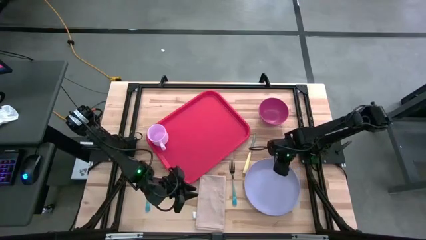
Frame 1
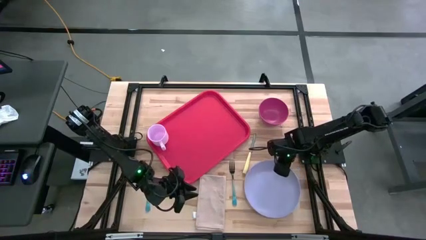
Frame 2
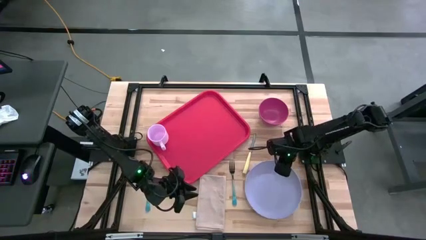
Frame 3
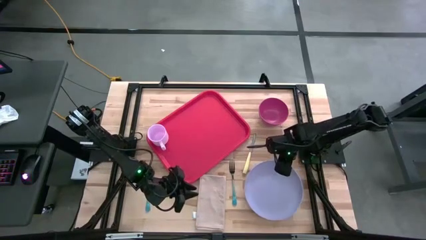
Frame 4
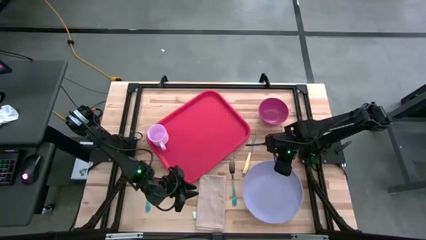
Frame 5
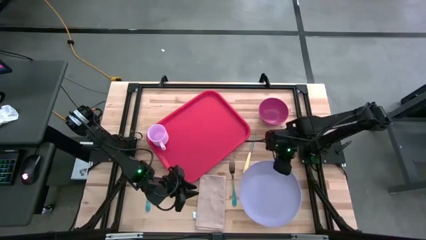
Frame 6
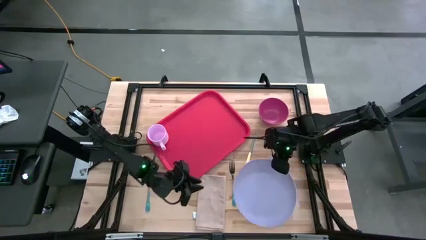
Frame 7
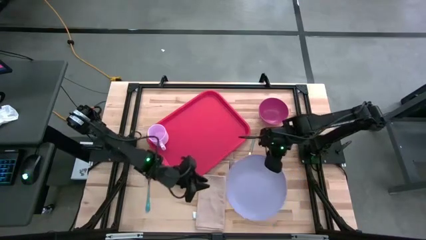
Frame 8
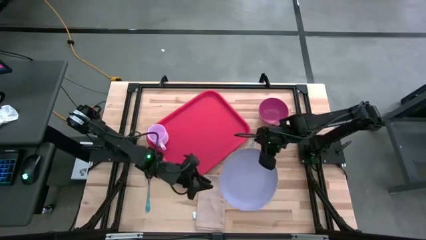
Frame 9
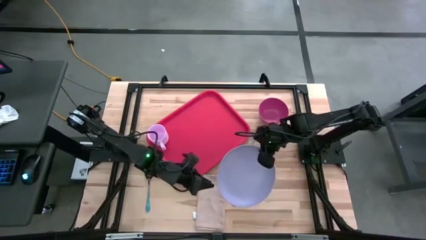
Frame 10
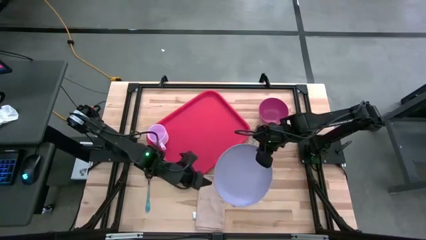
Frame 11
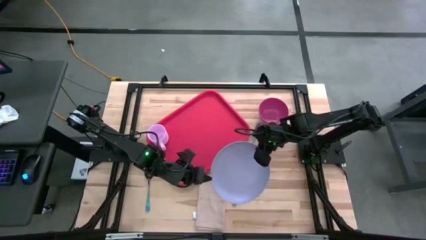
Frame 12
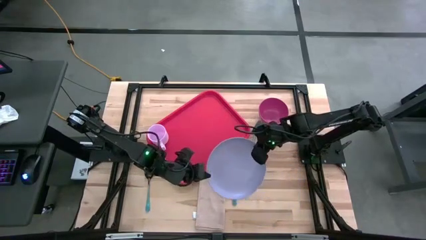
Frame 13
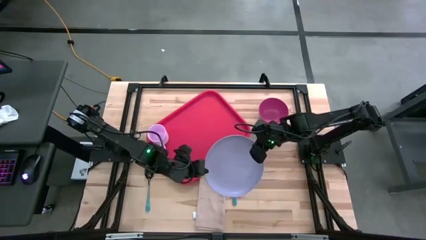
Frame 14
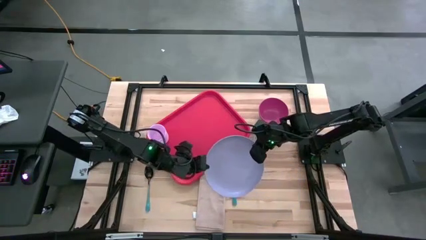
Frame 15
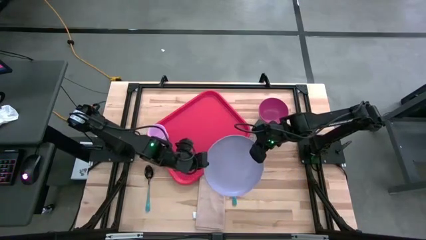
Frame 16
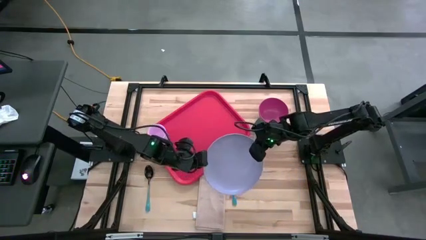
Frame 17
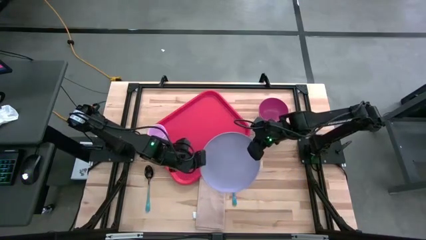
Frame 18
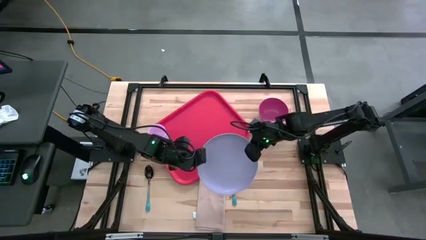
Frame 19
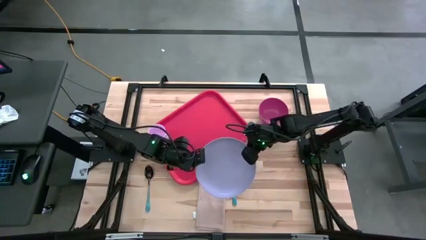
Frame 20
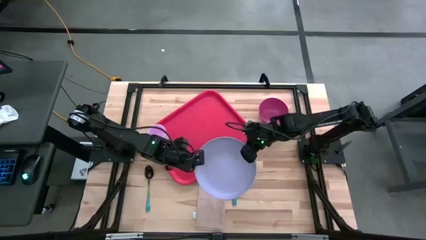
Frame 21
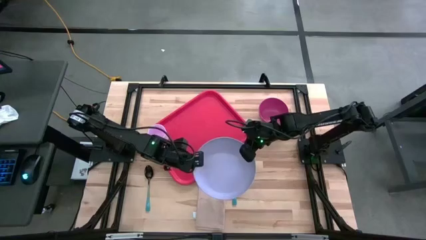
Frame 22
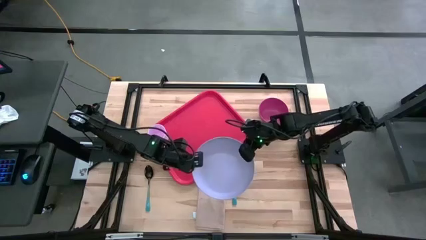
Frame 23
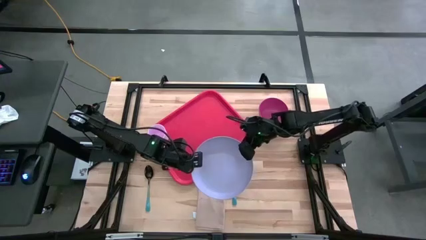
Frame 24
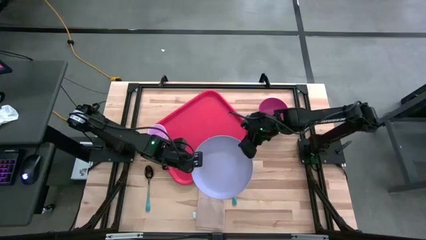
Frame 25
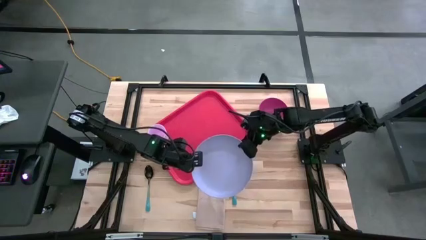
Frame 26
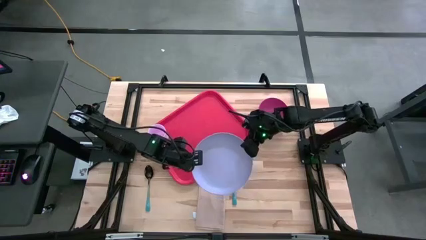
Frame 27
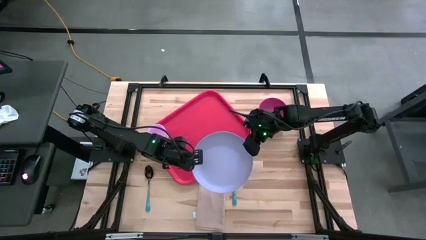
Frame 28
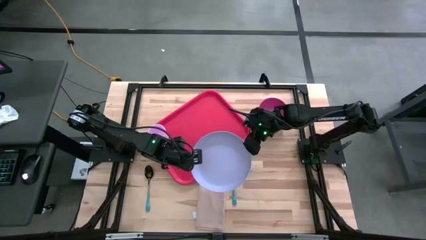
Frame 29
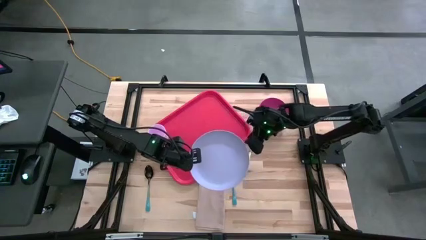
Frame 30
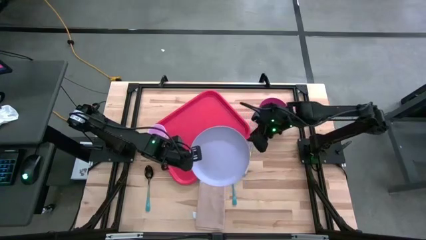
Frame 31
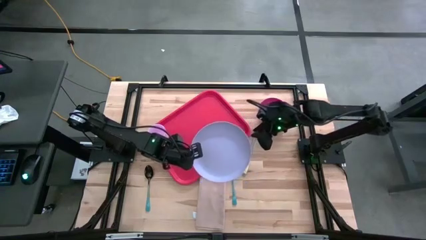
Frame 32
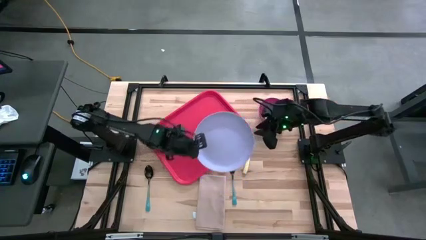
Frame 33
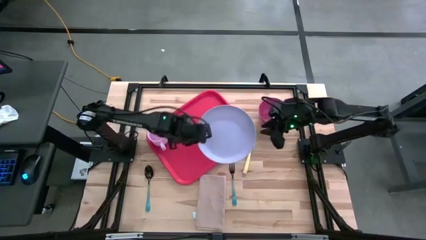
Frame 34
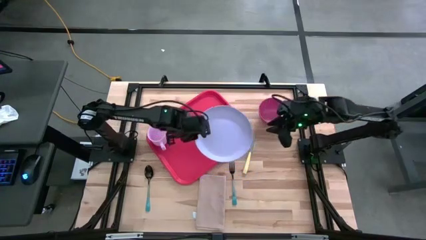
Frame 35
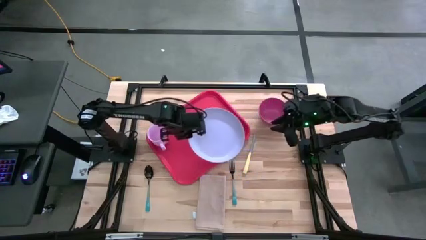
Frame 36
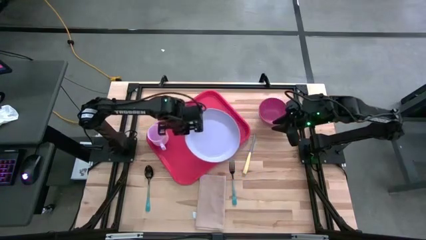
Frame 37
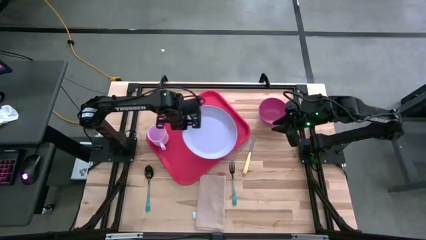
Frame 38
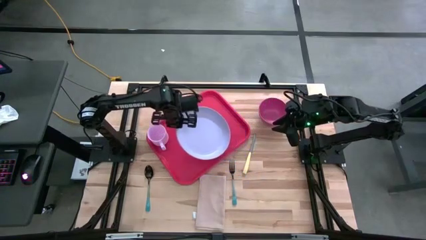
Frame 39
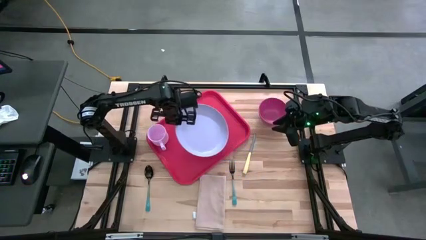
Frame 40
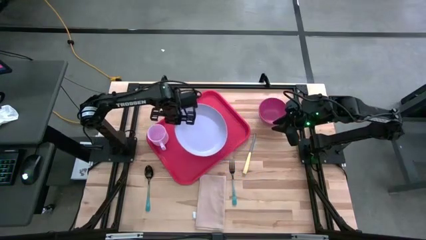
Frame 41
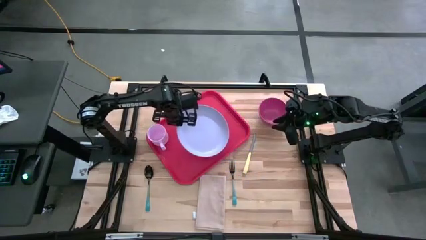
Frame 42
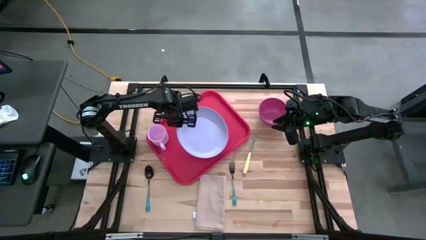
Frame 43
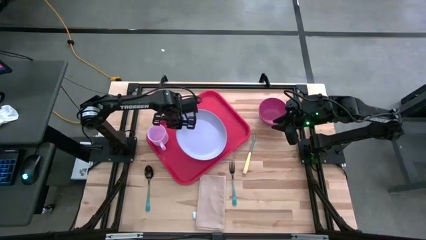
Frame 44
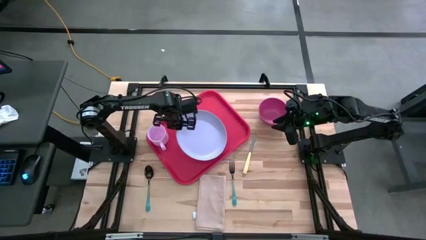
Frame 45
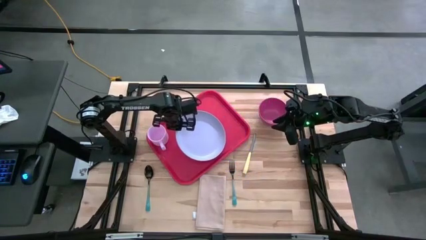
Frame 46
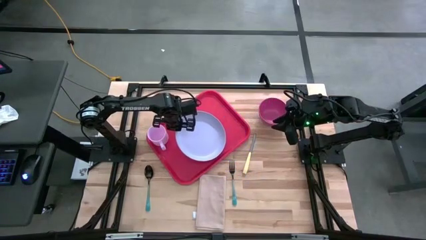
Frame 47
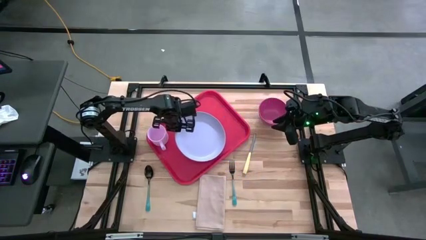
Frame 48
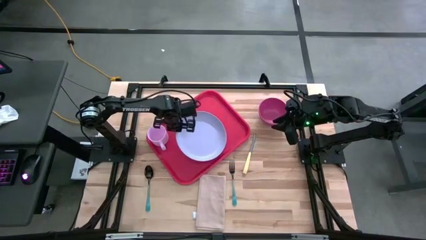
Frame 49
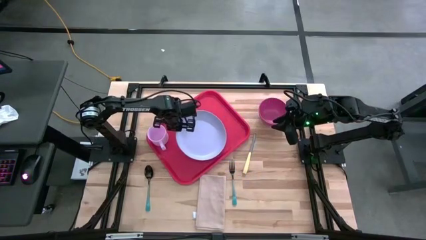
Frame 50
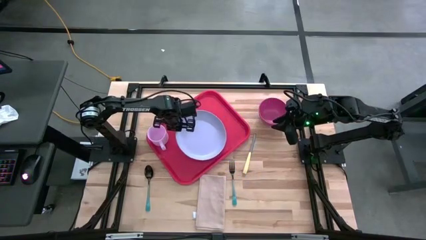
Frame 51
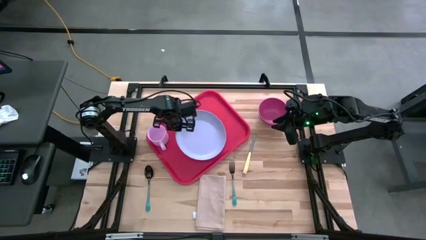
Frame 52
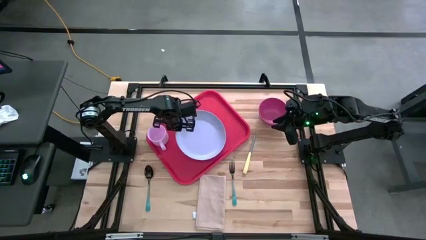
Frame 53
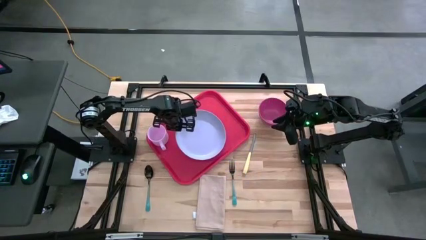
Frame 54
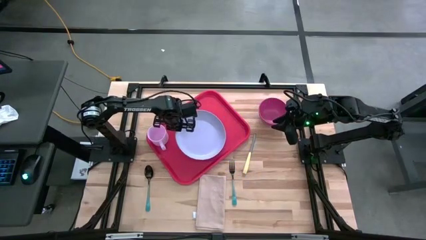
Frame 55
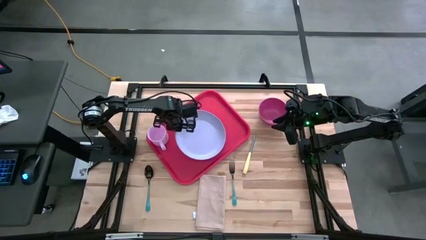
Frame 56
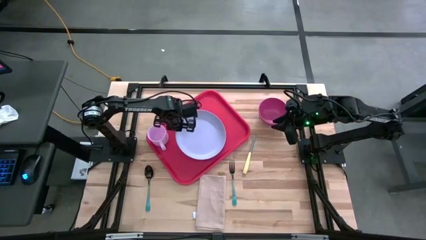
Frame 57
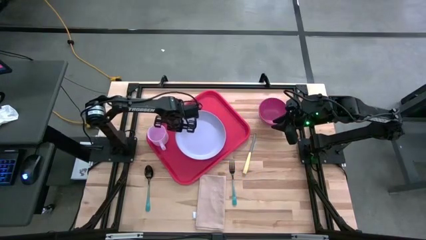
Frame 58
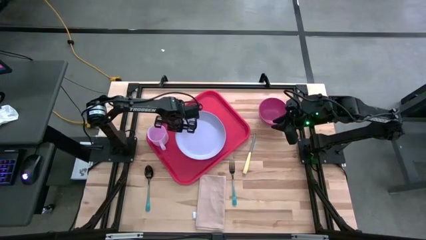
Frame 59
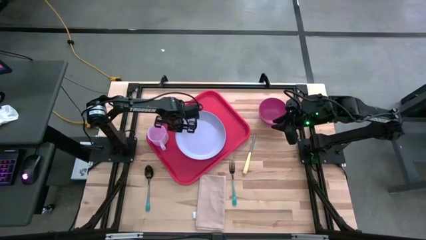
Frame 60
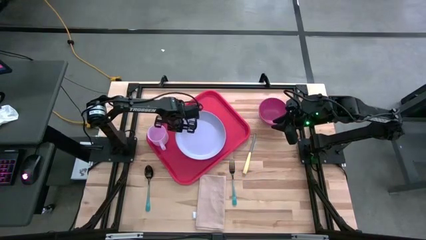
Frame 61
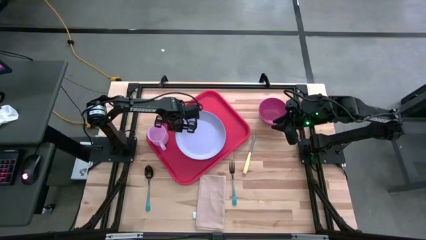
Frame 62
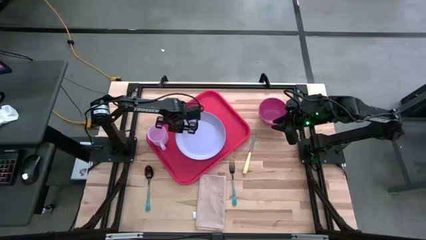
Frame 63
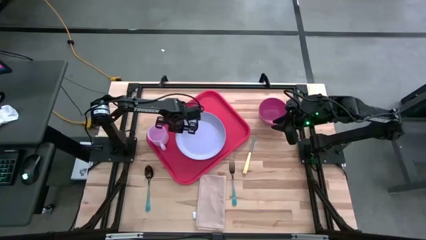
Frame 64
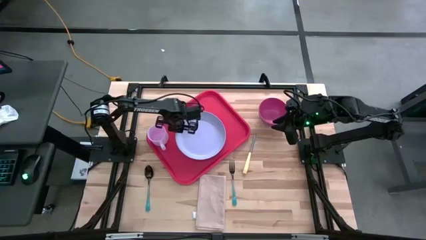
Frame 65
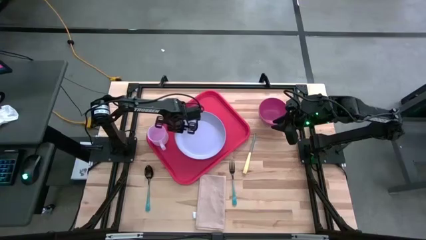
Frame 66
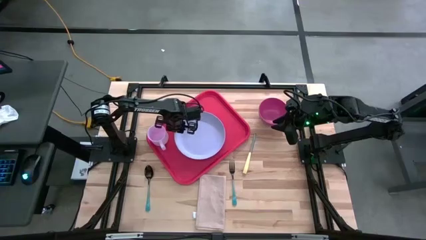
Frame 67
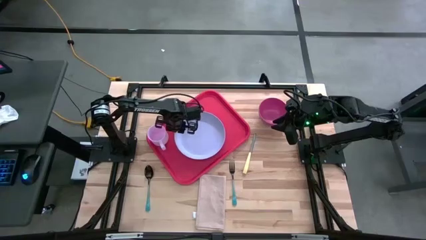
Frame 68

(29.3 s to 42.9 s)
Task: Set up tray
Put the purple plate to the right of the light pink mug on the red serving tray

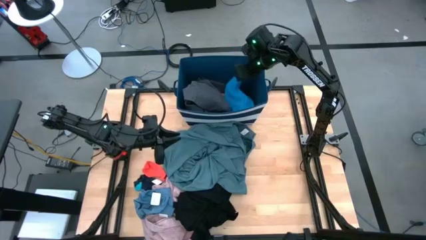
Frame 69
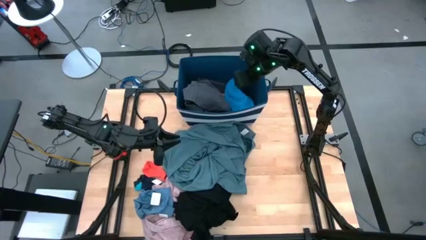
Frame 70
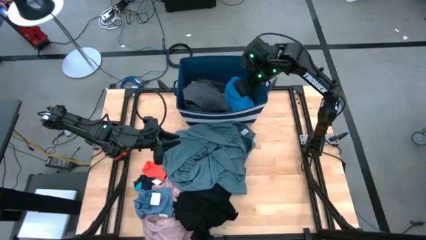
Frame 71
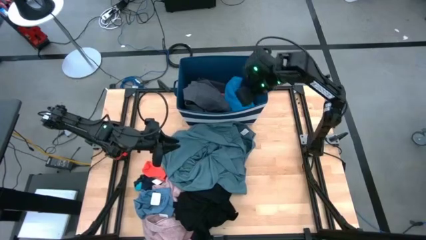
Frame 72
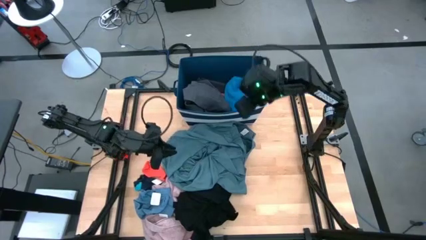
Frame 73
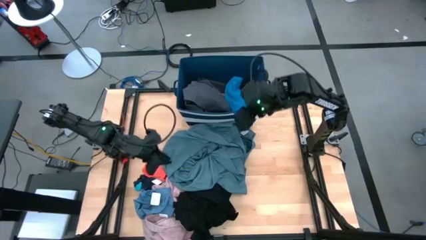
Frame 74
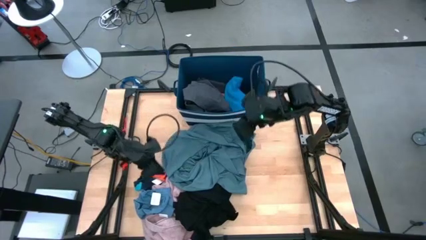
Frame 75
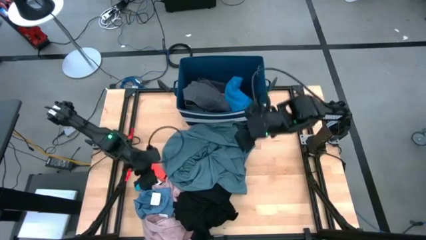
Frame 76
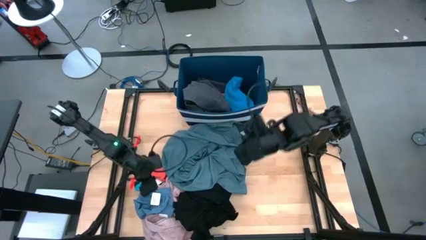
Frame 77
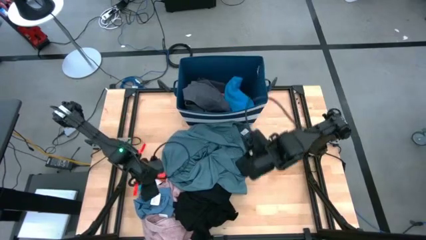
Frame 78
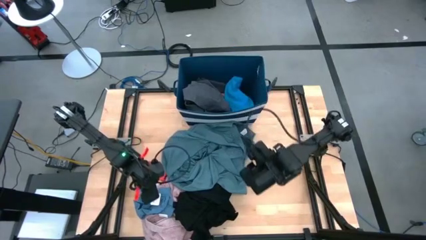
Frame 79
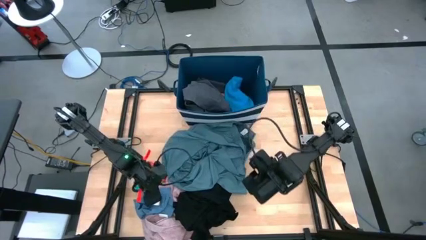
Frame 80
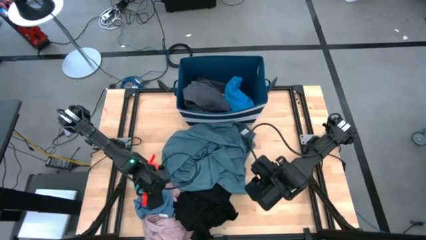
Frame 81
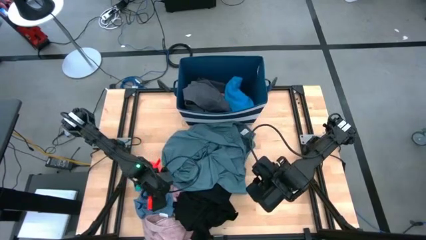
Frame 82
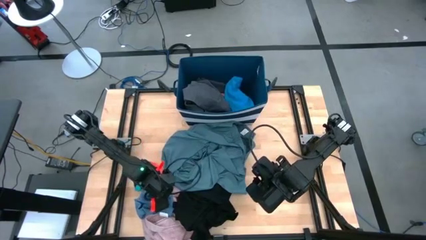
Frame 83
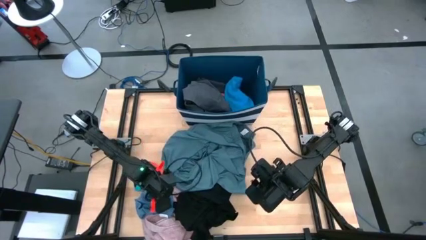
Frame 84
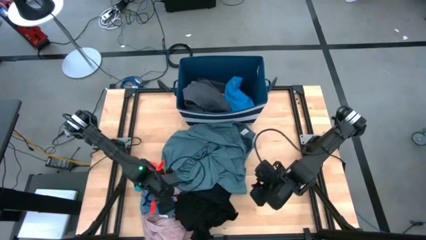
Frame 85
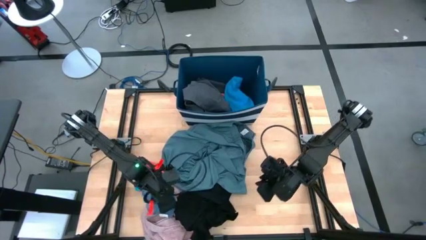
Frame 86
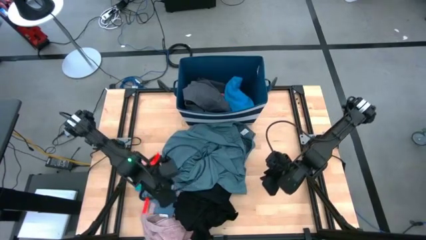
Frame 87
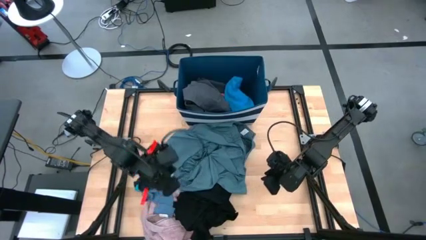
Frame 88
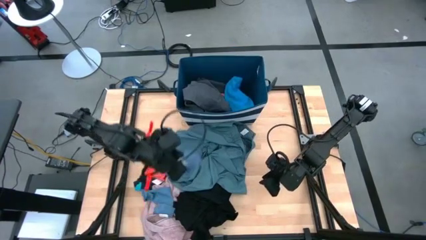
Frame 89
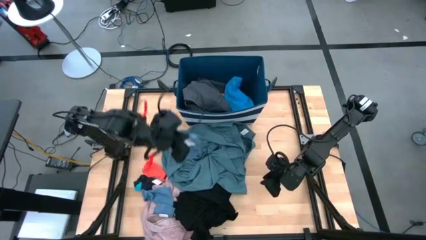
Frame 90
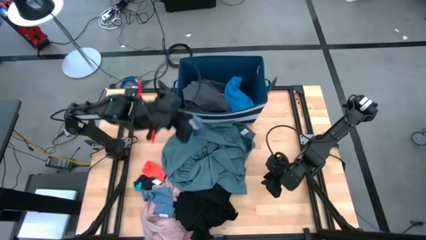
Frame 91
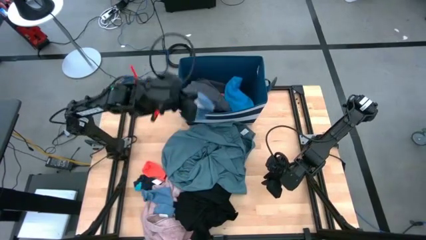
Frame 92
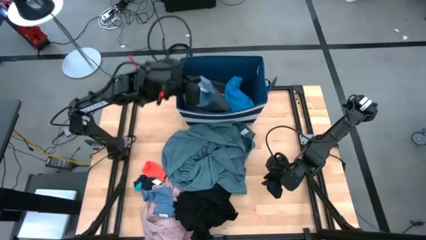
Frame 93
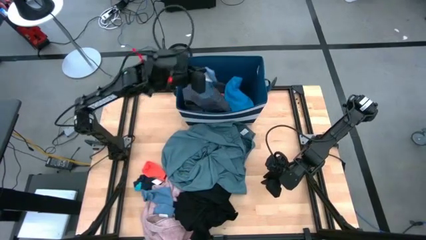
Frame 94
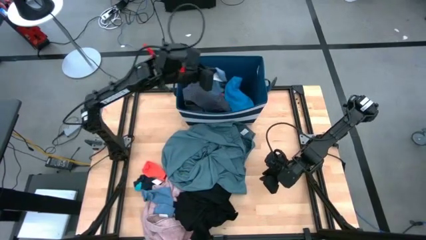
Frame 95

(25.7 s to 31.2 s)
Task: Sort clothes
Put the blue socks into the blue bin
